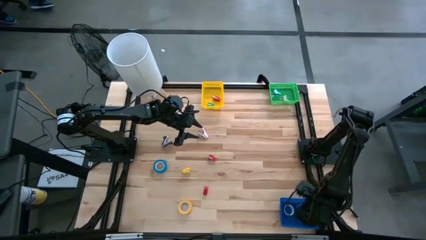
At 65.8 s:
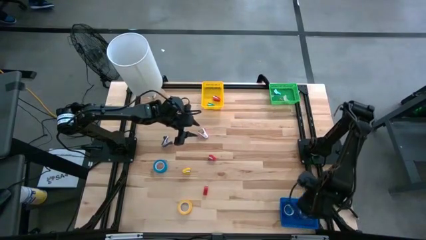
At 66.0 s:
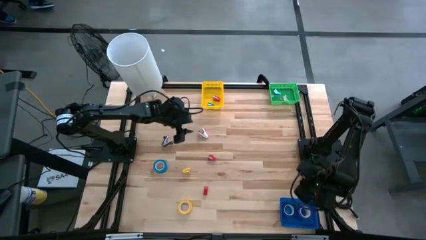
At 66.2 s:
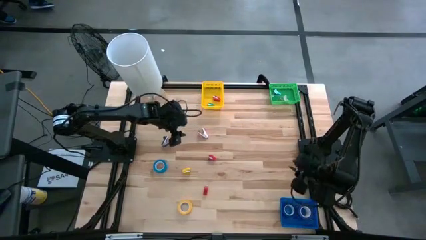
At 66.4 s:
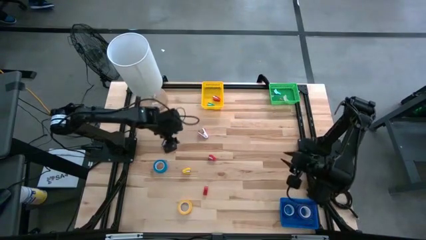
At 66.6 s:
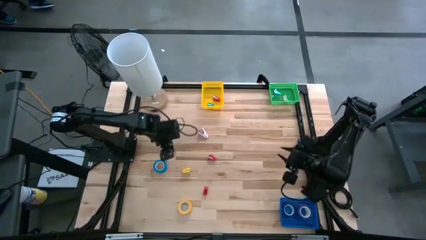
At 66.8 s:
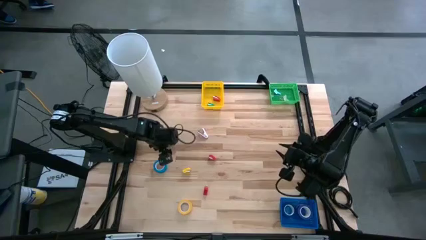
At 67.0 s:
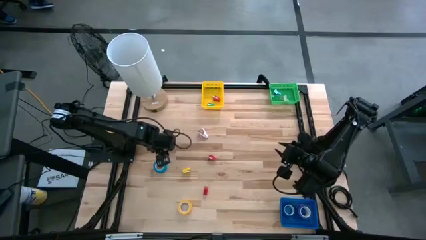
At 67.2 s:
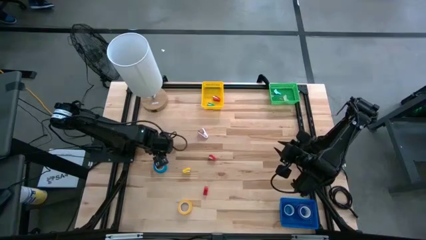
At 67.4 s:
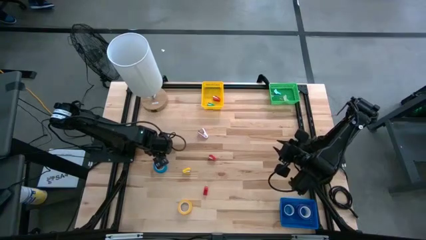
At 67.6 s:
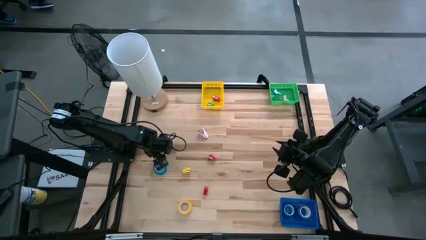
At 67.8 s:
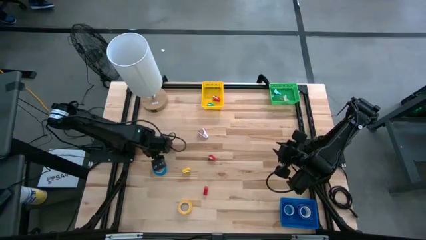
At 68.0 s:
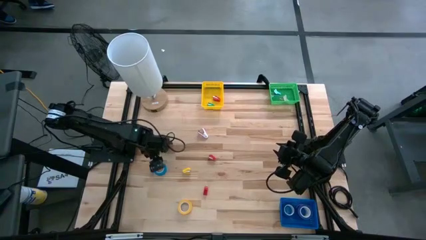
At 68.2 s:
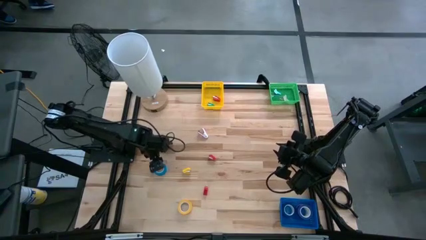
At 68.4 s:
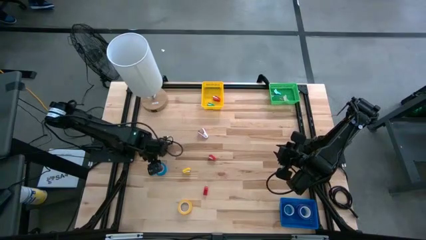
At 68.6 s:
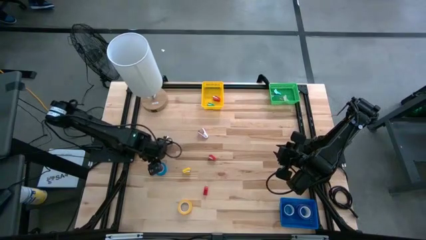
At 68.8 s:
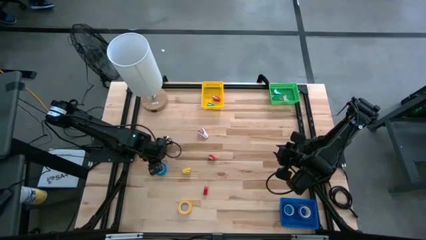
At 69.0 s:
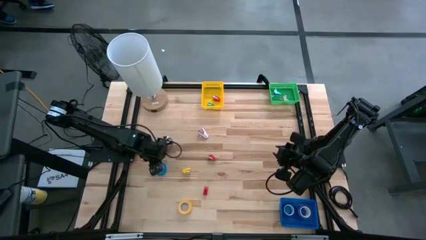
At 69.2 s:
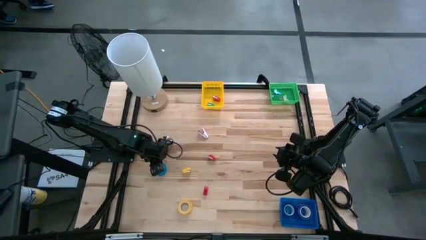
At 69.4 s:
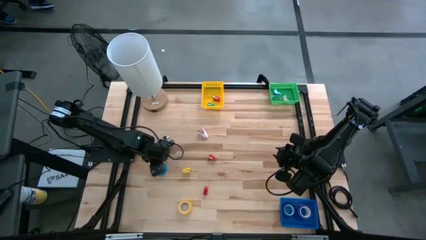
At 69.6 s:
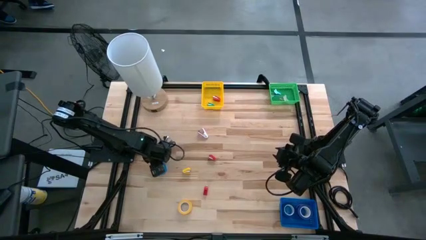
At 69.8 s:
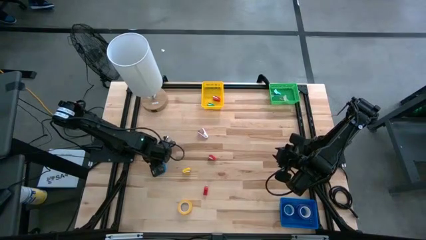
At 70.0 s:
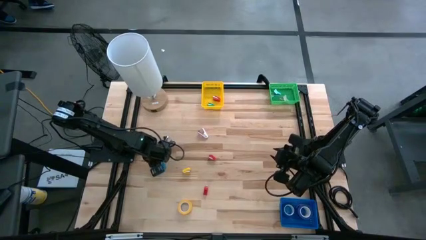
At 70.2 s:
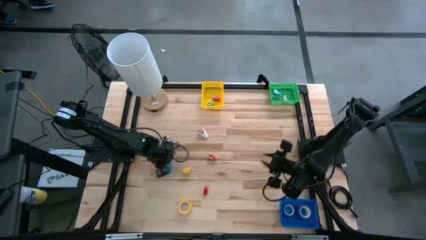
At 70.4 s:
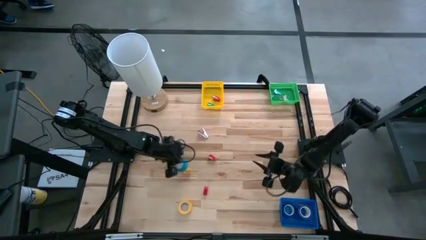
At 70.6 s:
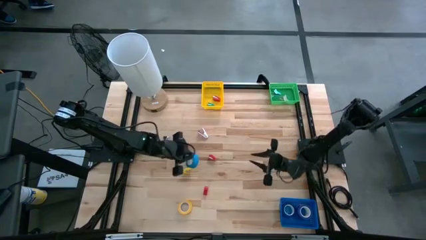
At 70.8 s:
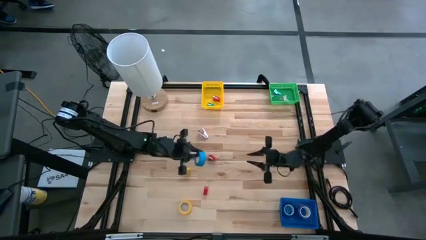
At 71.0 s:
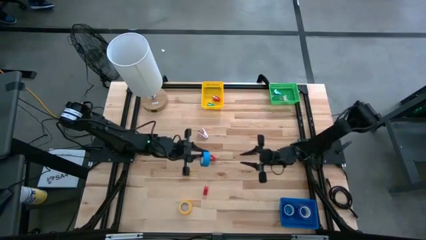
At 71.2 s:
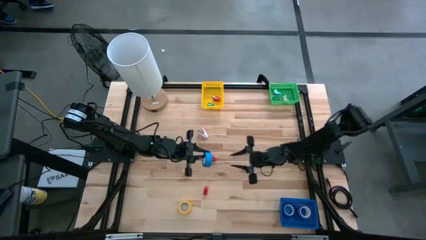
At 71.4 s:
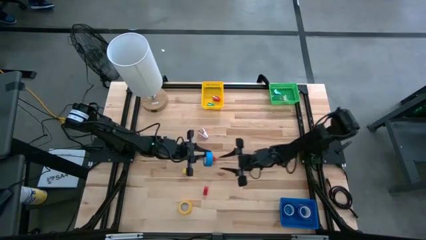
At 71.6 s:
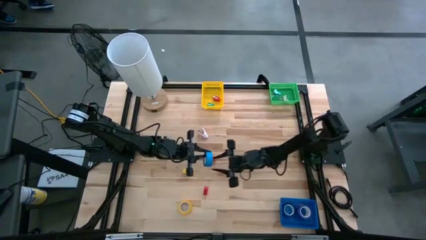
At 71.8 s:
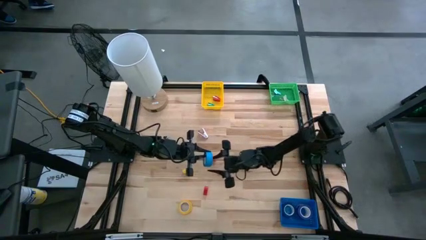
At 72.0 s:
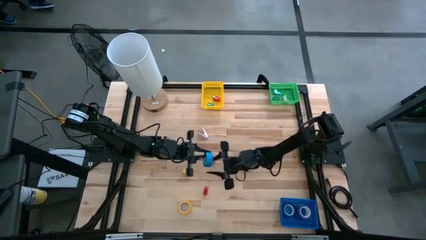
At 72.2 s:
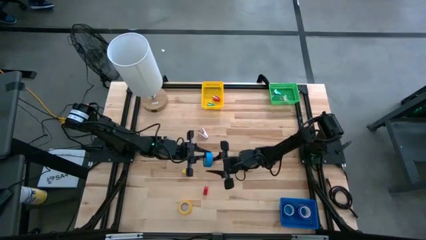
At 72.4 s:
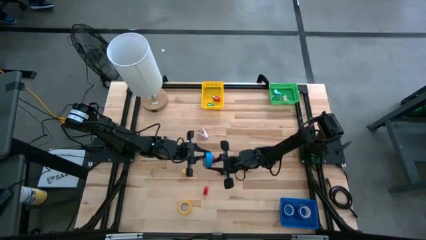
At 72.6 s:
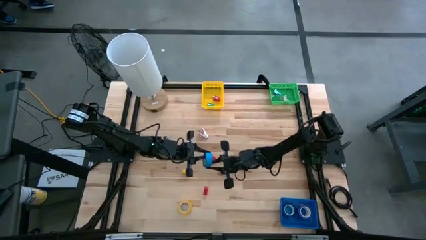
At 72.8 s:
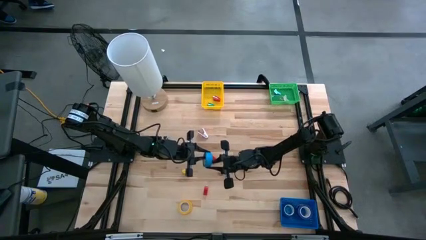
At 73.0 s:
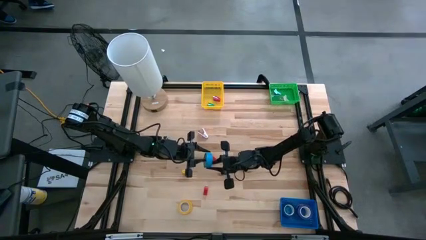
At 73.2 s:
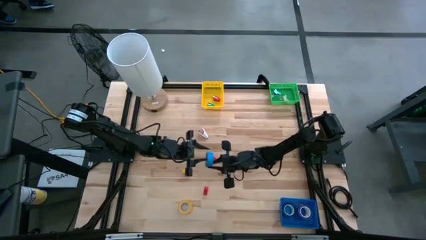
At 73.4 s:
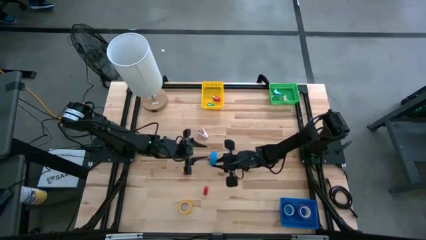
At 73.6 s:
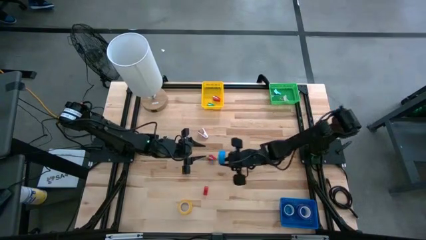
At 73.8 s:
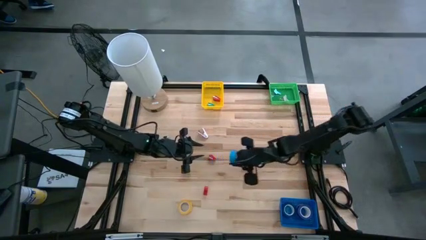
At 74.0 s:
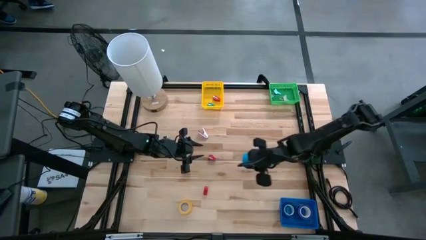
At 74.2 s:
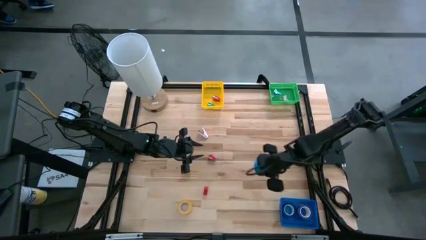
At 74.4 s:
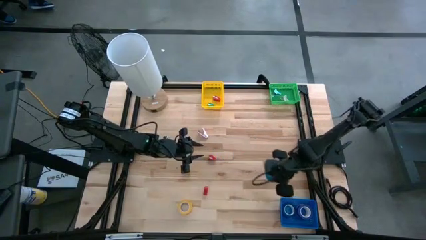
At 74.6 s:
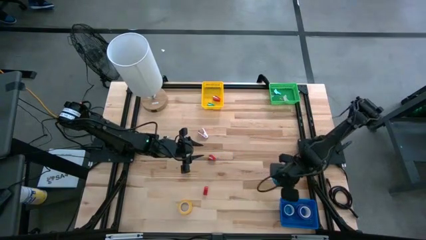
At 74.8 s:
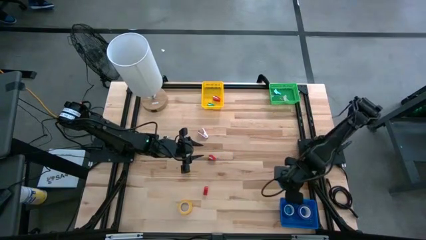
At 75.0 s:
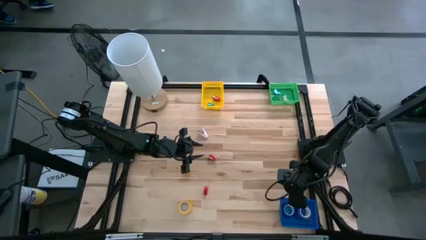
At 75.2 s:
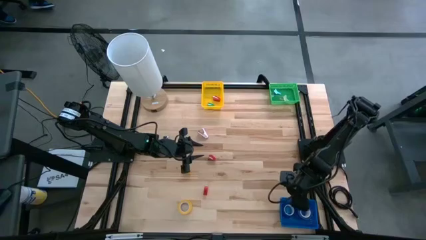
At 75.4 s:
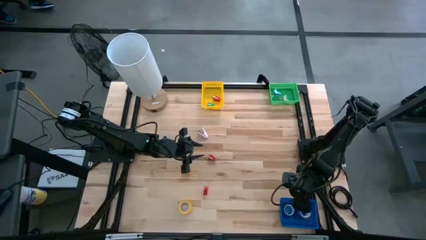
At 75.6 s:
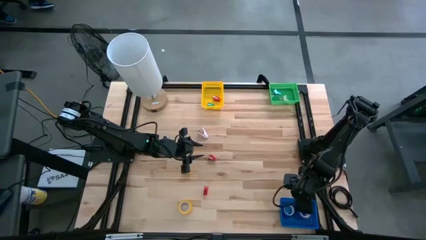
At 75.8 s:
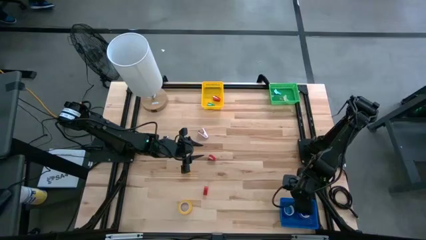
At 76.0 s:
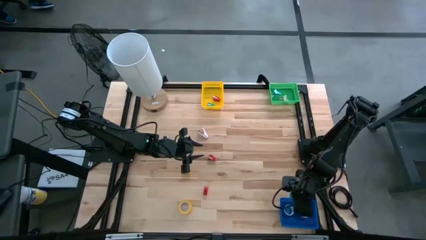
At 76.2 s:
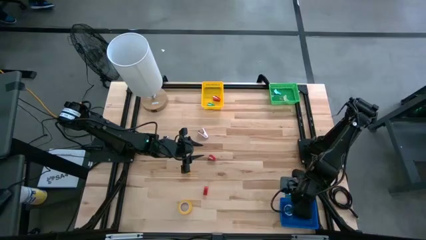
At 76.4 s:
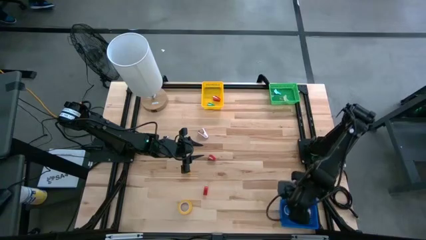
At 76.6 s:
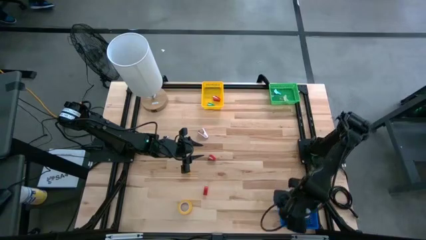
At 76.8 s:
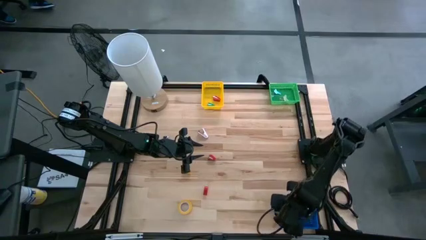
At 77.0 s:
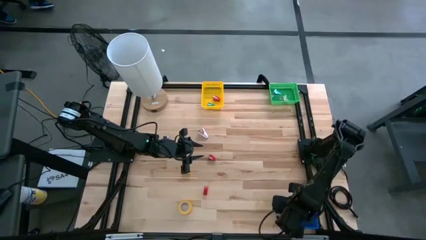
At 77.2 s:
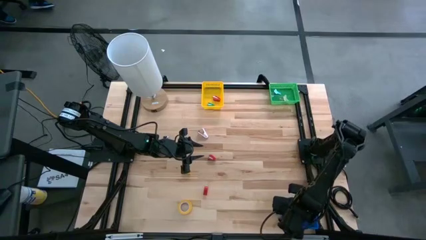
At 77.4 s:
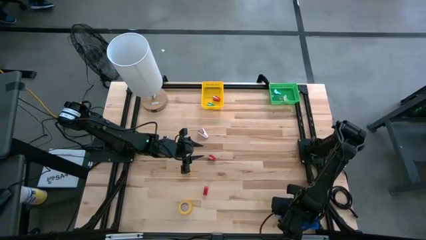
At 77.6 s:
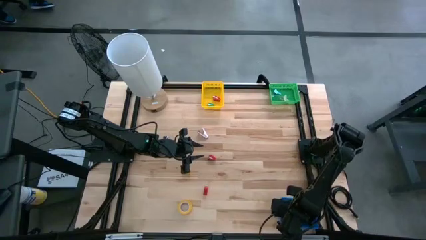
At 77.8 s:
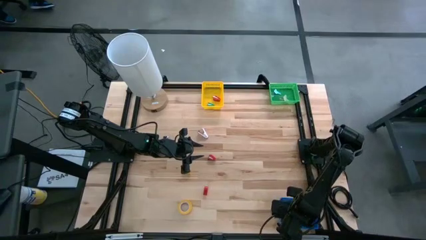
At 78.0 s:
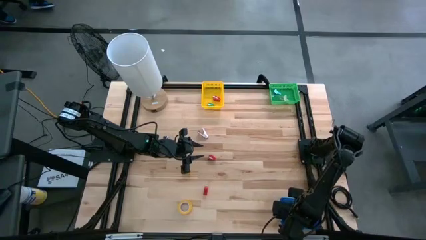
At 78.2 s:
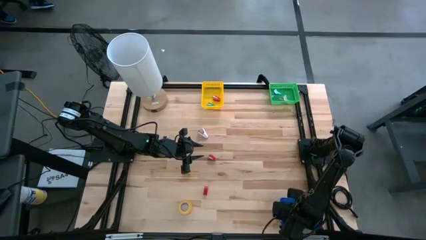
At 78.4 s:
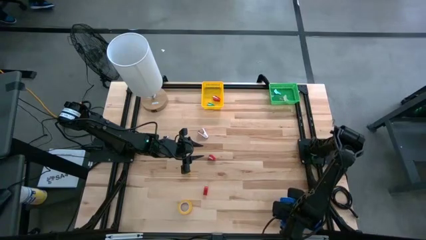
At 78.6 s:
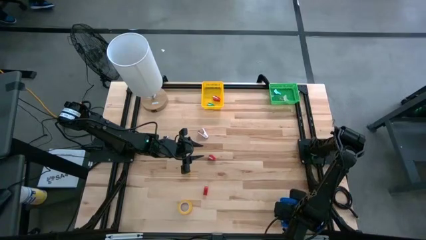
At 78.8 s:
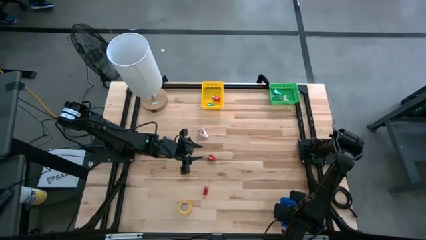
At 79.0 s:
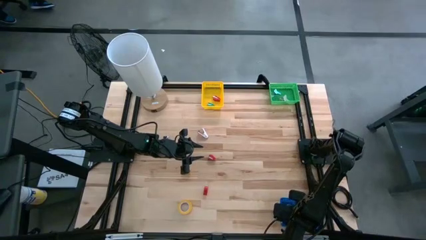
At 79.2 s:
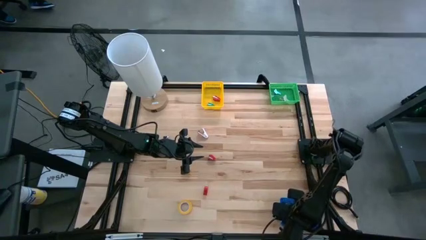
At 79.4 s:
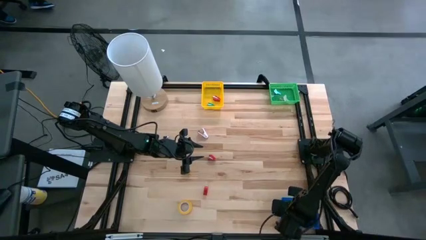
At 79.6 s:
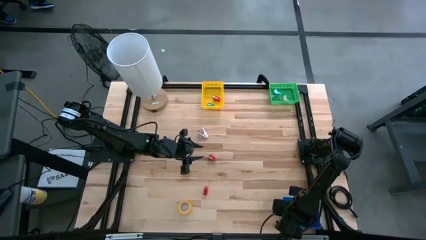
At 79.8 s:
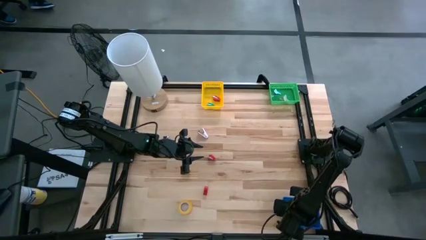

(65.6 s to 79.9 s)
Task: Pick and place Stapler, Stapler remover, tape
Put the light blue tape into the blue bin

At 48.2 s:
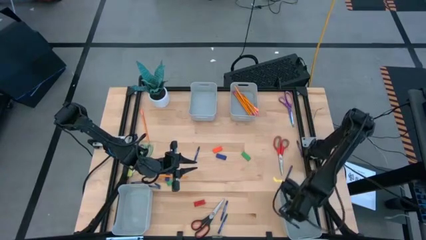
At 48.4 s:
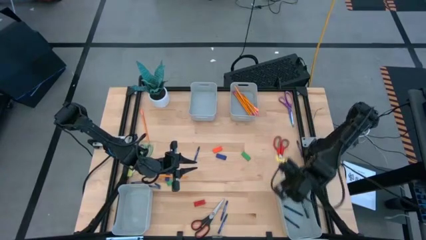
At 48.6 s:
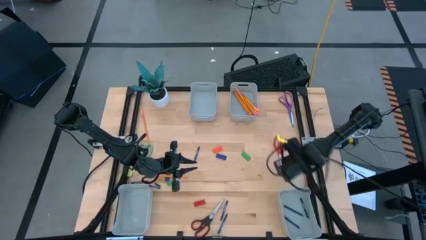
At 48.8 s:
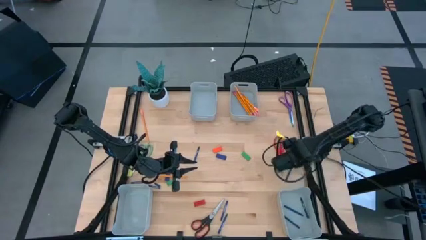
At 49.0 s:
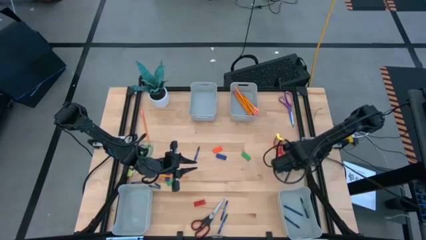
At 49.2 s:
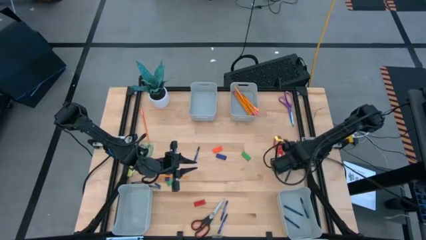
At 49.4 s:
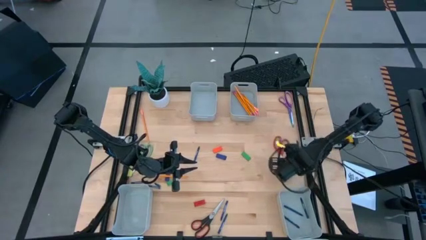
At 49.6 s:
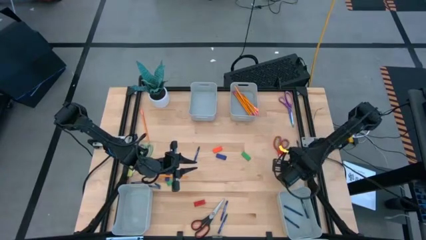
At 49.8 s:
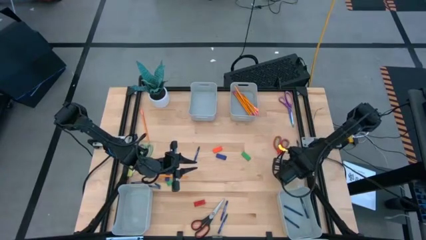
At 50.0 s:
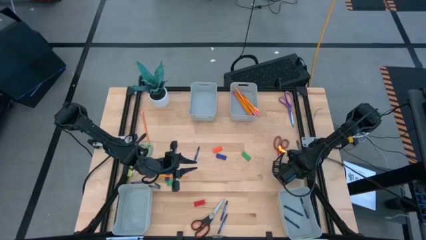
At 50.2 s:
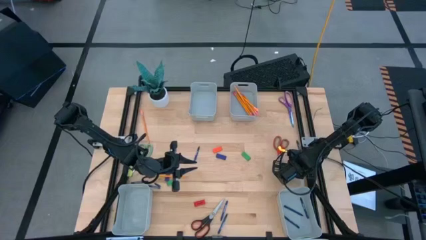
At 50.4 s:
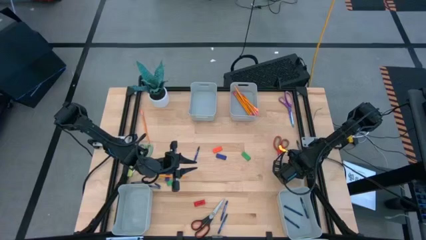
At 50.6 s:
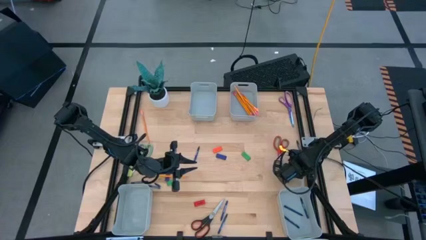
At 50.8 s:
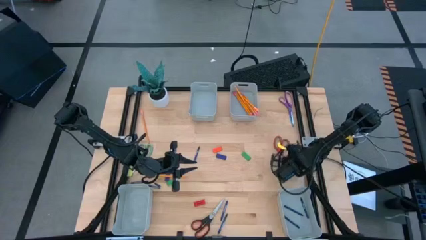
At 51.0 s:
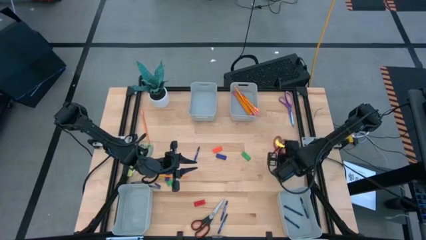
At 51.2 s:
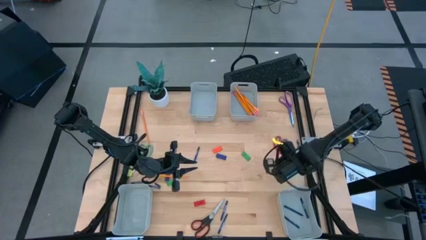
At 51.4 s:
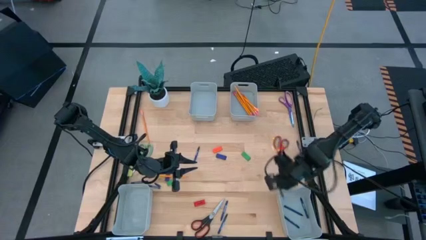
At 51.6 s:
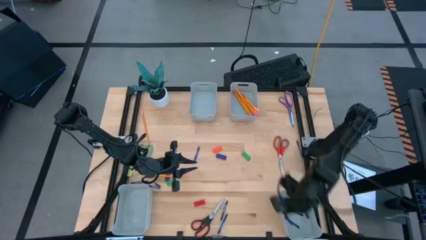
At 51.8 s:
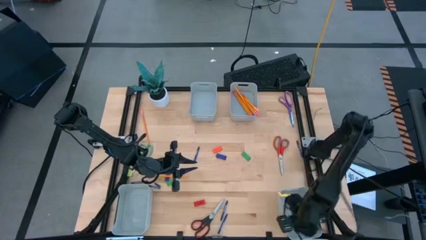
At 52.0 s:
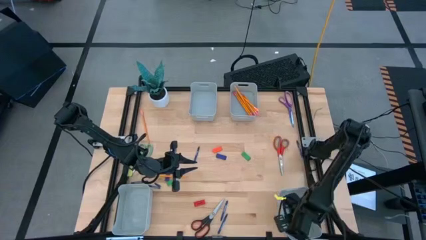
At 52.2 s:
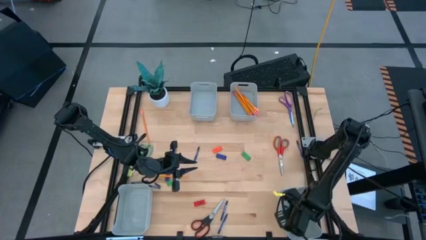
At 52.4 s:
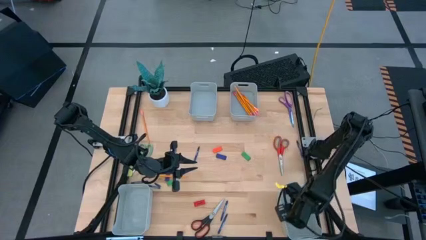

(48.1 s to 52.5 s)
Task: Sort crayons/erasers/pens/pencils in bins
Put the blue crayon into the bottom right bin
